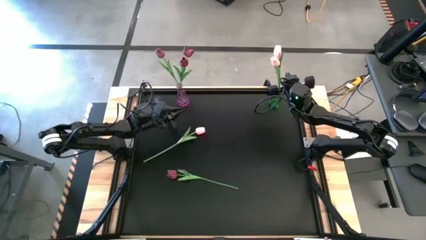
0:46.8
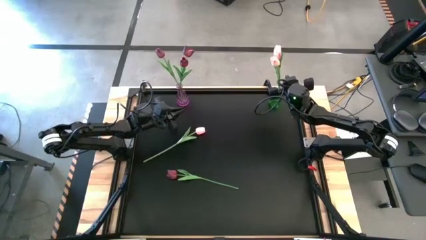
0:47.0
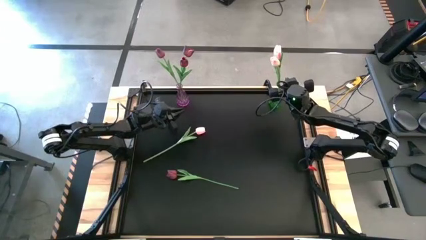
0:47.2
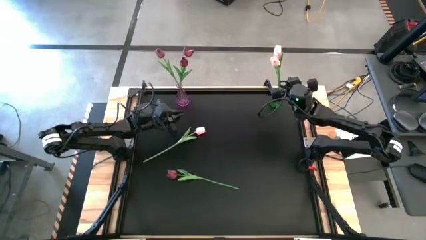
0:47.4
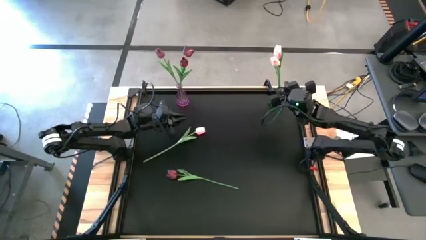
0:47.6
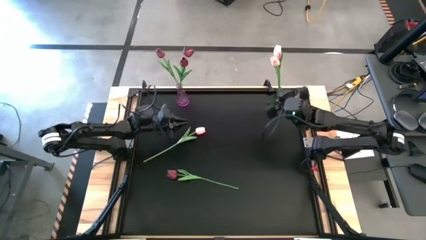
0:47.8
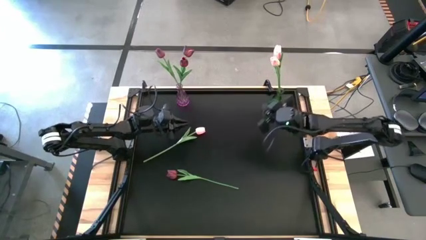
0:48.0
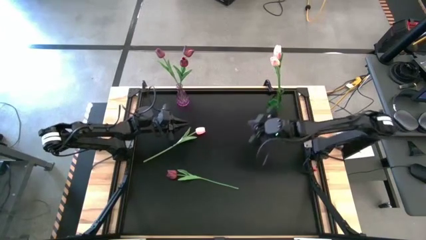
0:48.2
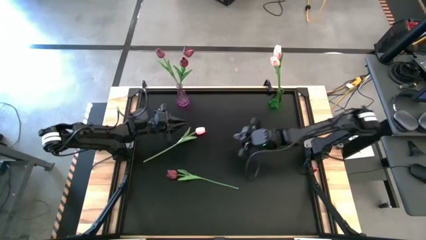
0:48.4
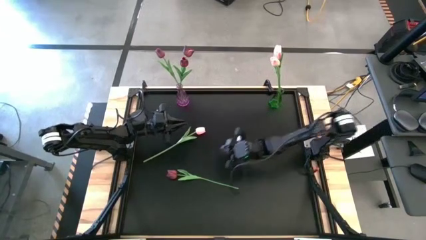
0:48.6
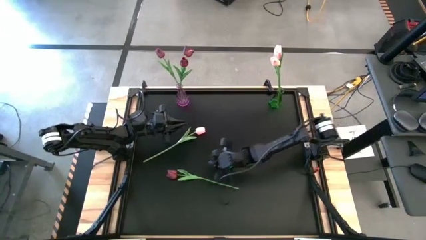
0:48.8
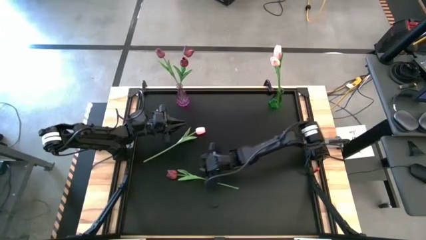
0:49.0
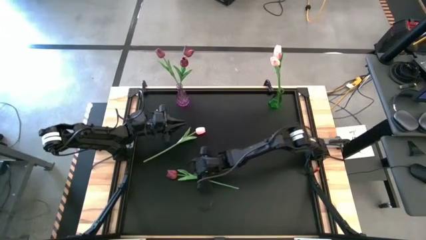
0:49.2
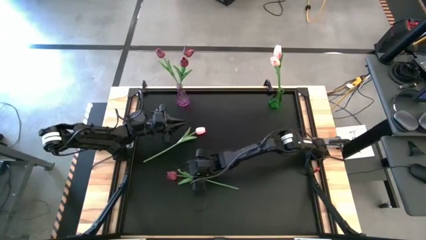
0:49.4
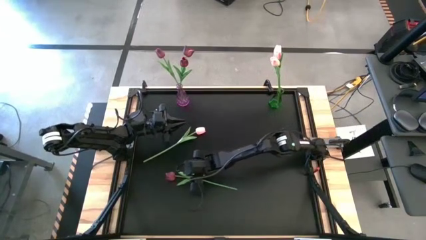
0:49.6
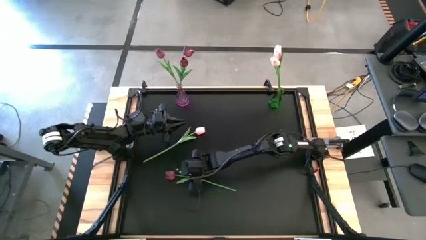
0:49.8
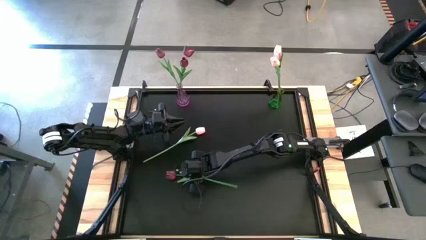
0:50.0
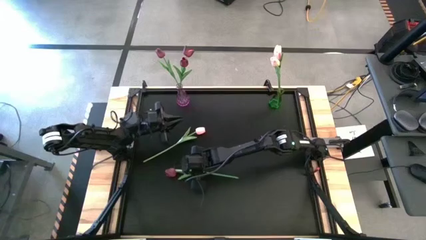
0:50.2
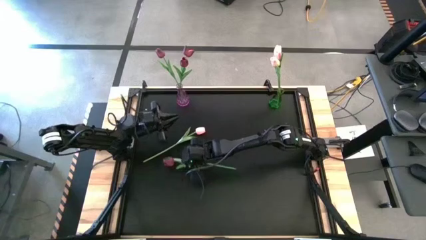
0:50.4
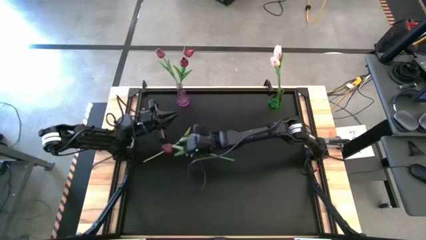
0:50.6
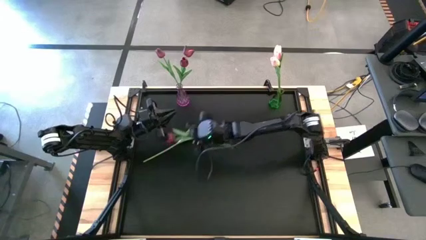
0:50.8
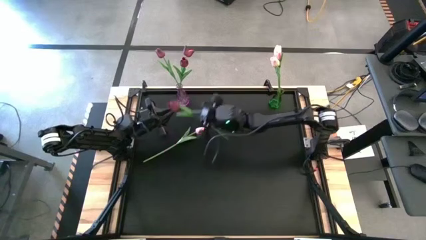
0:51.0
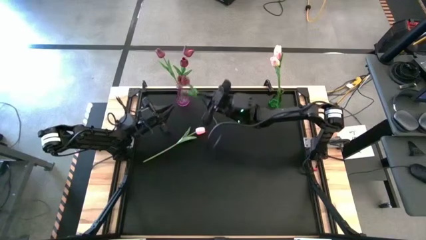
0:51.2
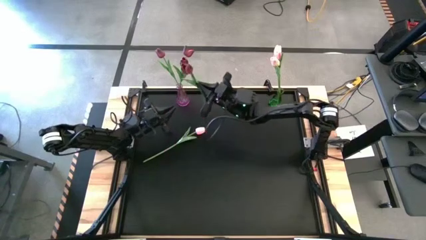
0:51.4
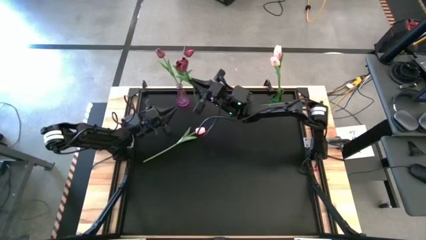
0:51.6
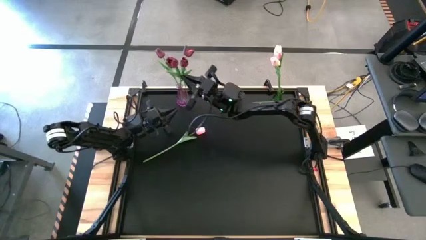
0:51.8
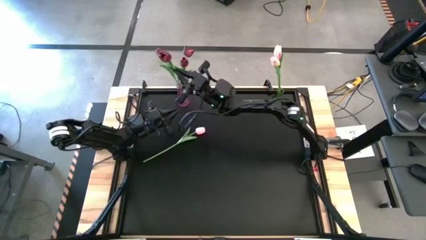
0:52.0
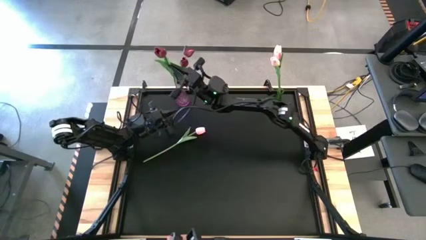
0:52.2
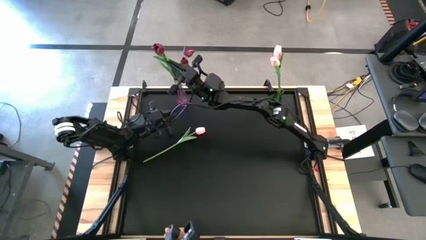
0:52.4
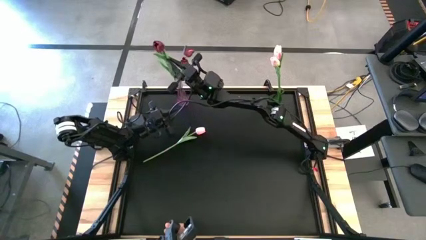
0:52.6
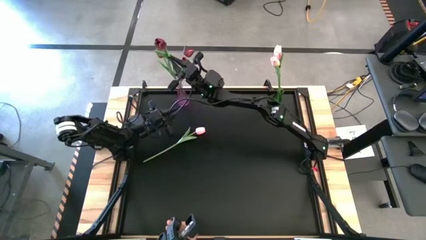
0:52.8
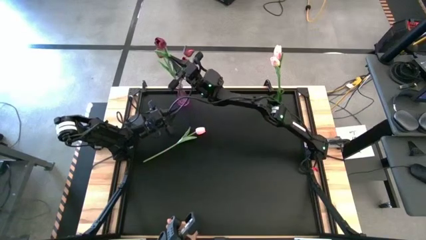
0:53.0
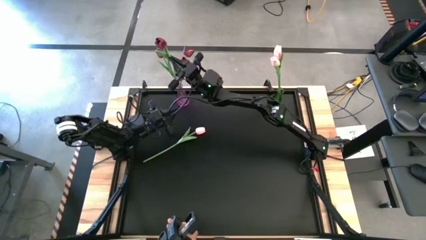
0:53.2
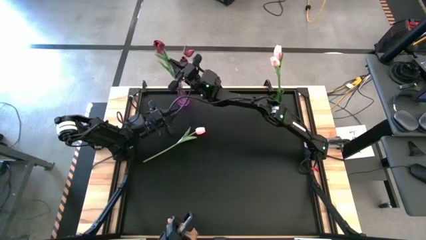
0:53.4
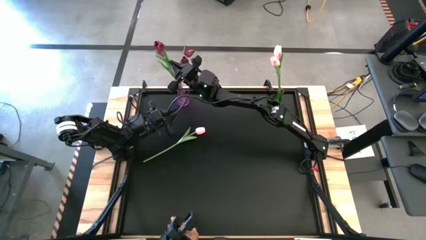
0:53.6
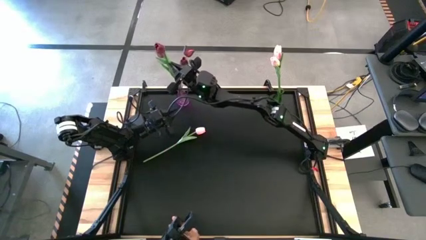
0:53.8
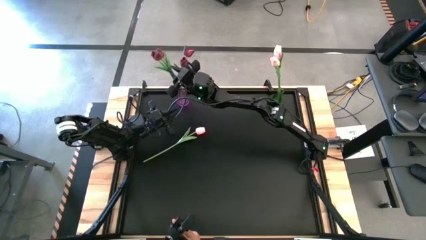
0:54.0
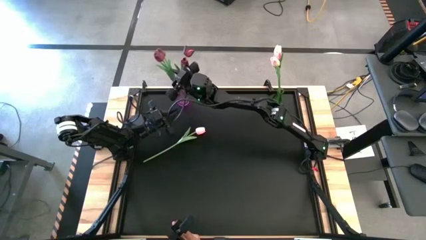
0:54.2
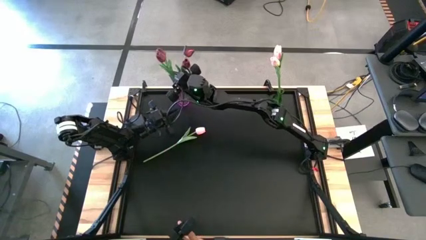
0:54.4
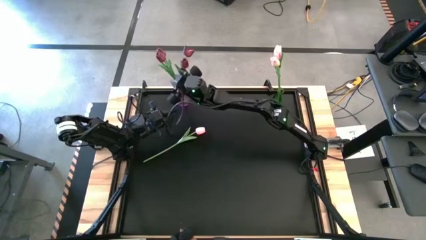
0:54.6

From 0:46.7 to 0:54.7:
Task: Sort flowers into vase by color
Put the red flower into the purple vase

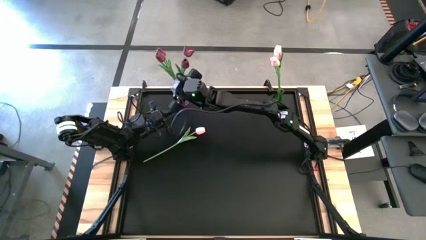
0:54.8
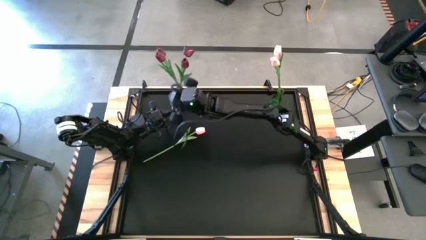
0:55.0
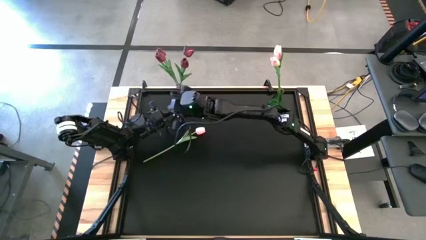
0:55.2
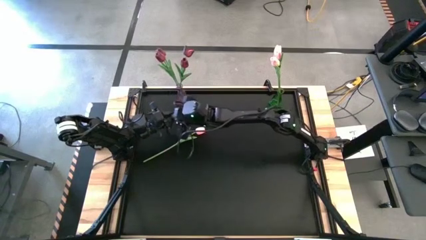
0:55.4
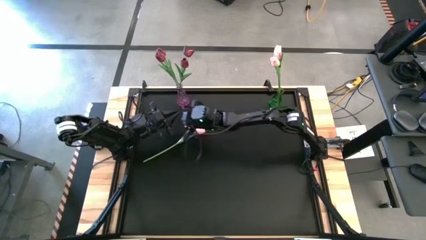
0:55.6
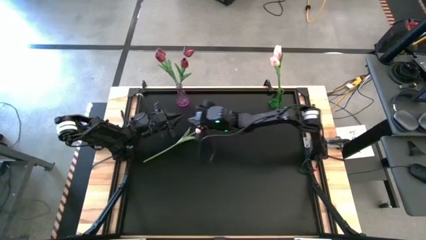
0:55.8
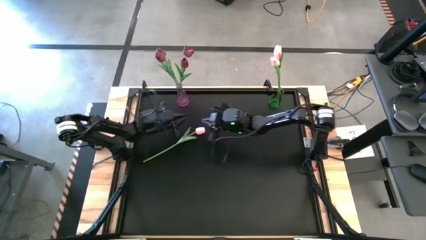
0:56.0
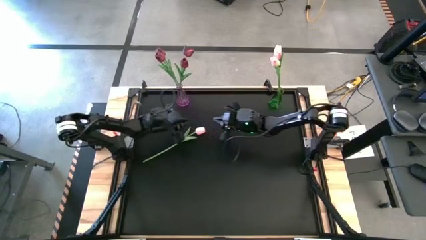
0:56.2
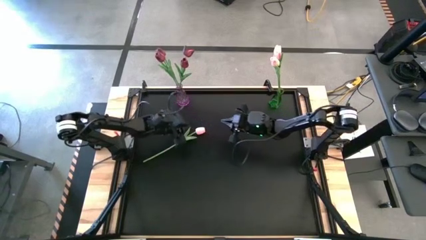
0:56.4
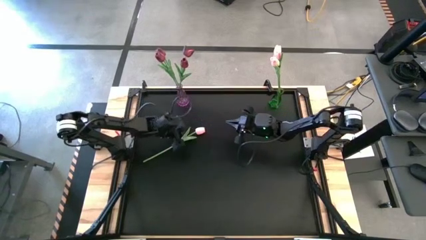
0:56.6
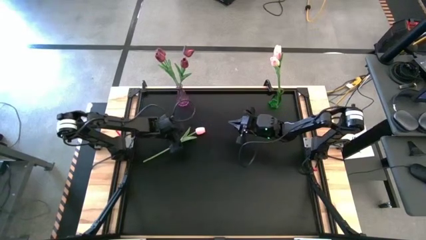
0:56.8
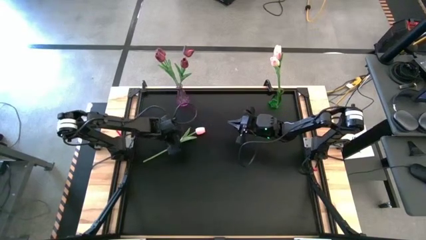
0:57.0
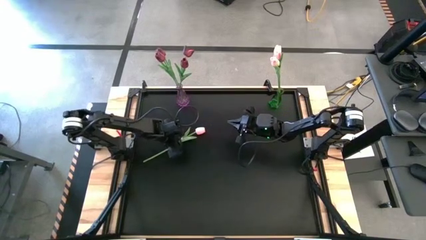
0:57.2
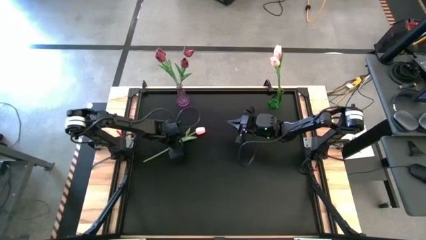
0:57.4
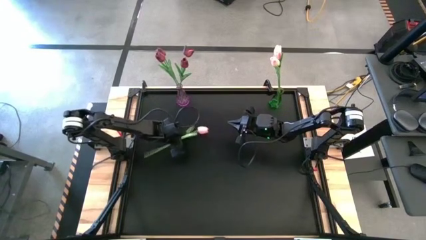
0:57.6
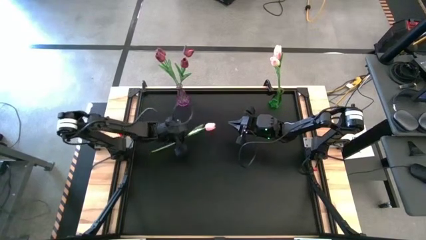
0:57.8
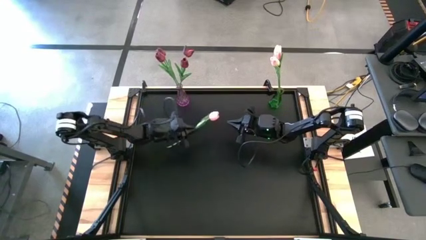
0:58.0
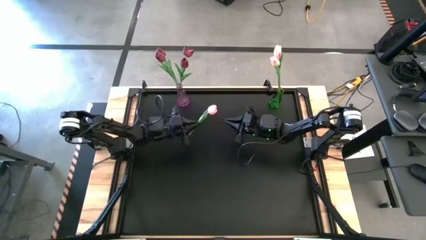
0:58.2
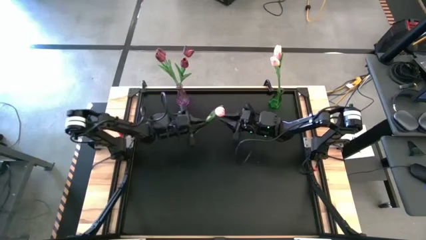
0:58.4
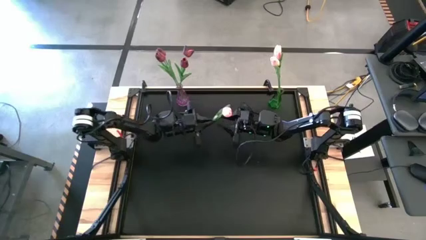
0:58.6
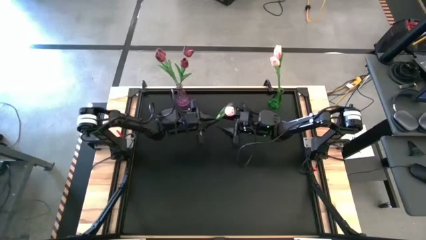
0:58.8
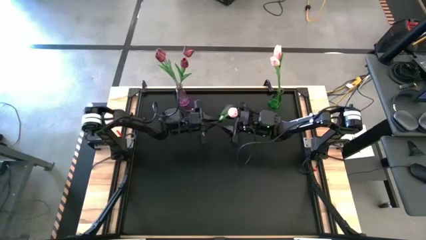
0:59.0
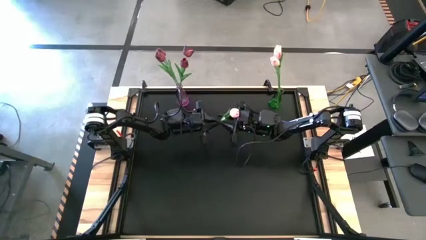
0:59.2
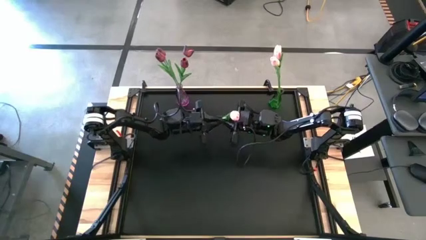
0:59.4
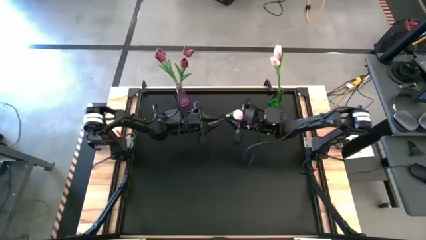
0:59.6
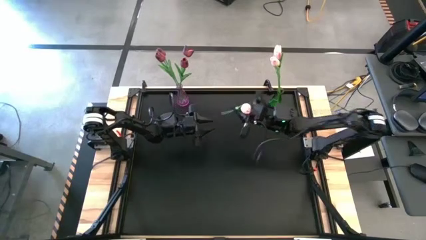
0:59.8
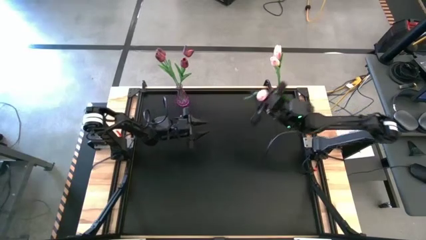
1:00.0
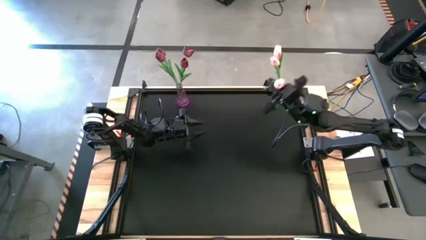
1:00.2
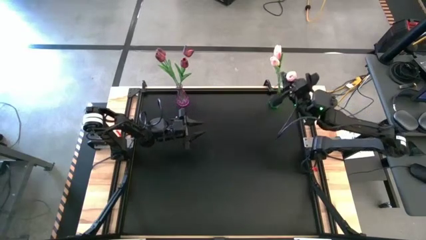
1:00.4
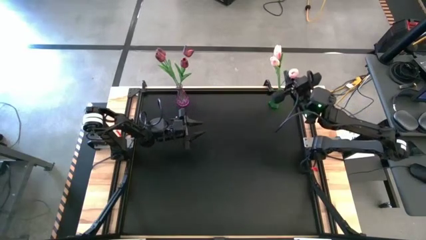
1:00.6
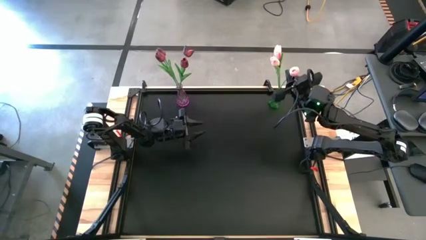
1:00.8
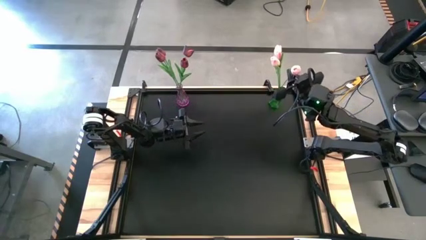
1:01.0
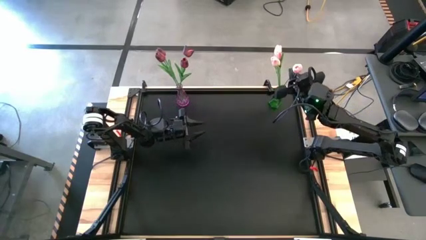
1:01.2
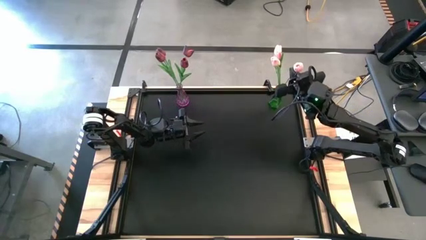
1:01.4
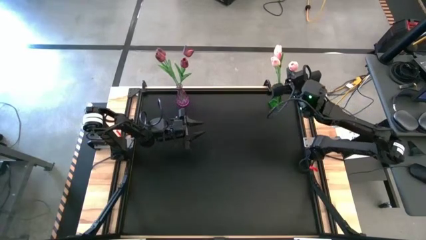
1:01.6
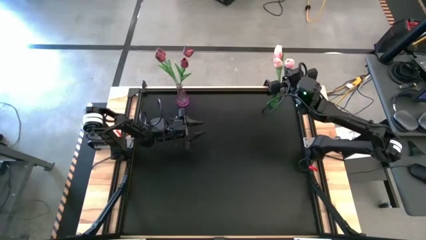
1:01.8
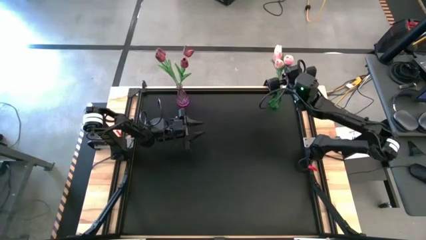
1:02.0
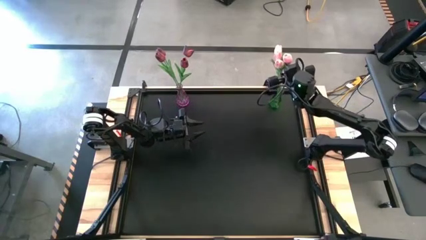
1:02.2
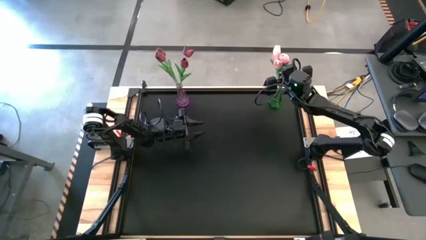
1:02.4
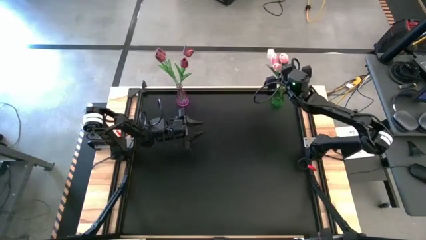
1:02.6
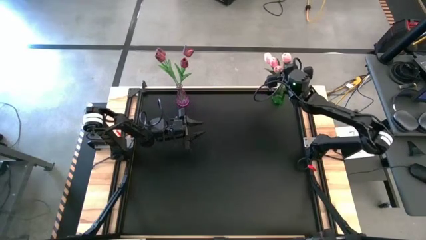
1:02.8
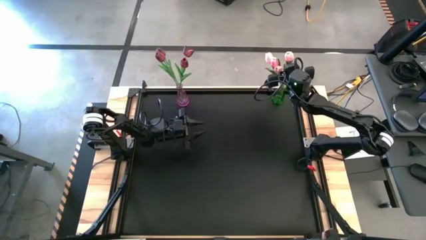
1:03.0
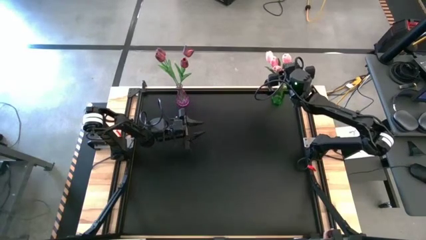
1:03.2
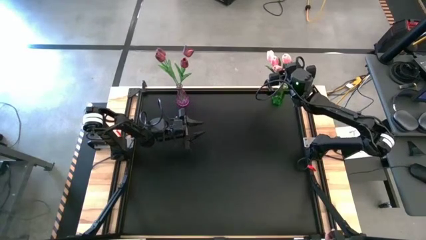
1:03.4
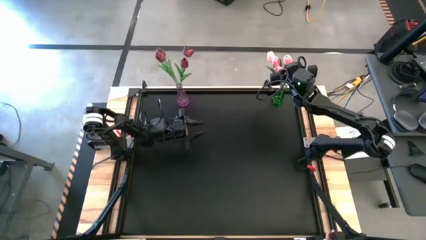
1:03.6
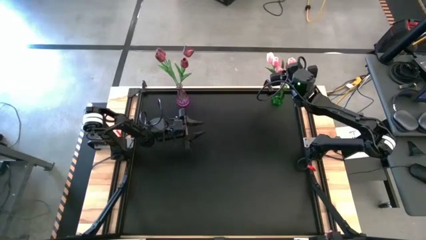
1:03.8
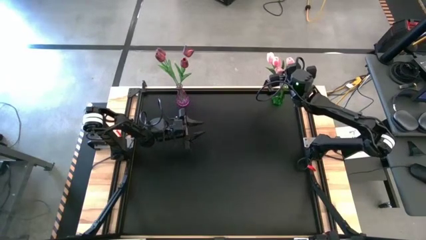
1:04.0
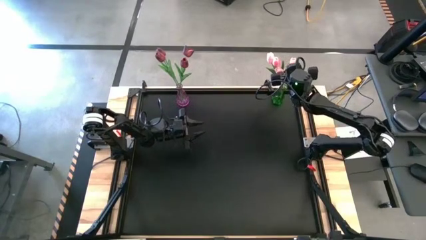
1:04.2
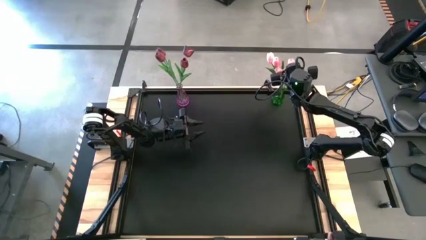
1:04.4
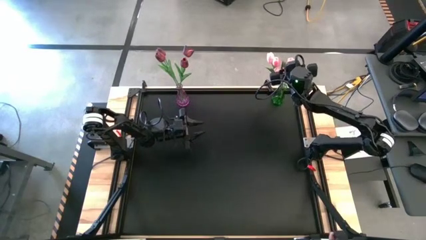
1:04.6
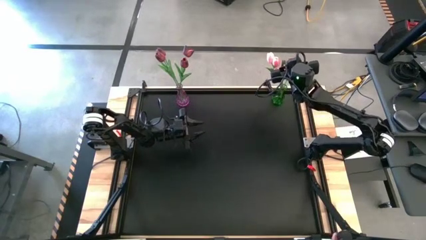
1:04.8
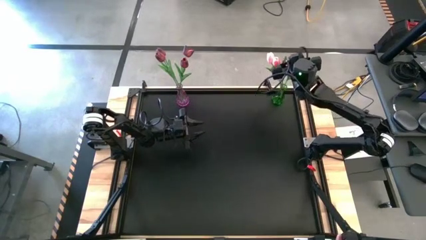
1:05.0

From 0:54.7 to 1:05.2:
Put the pink flower into the green vase
